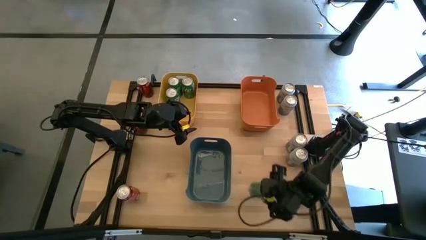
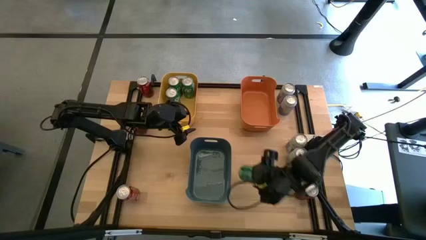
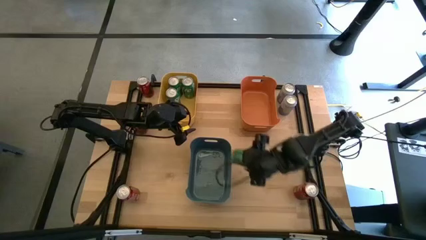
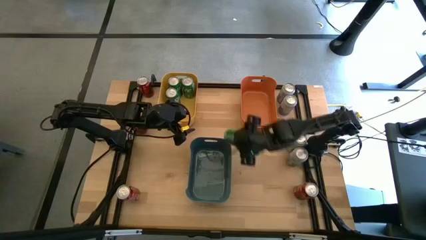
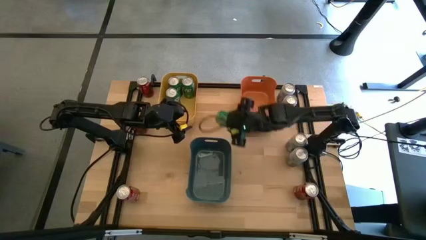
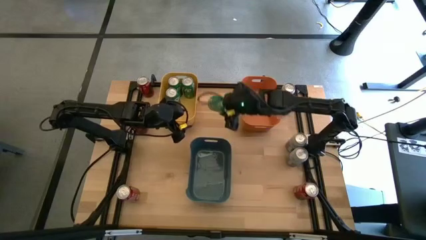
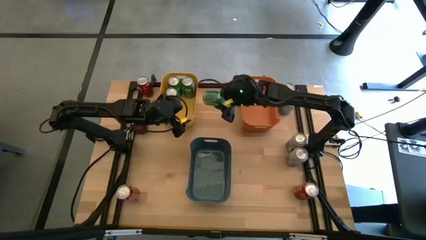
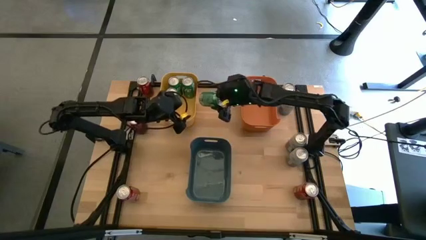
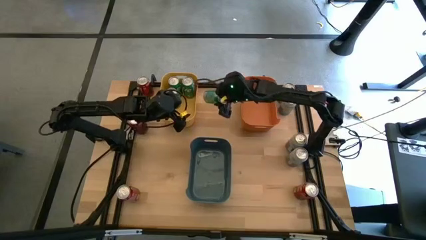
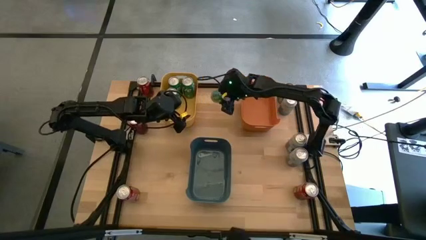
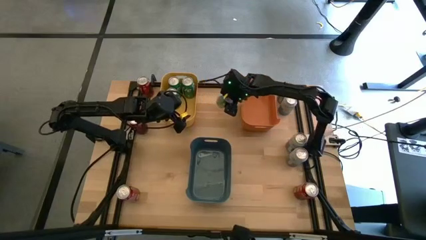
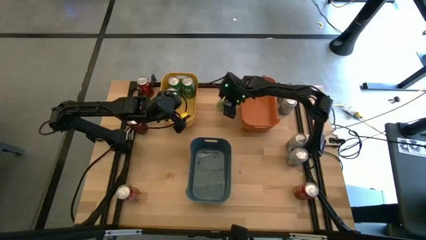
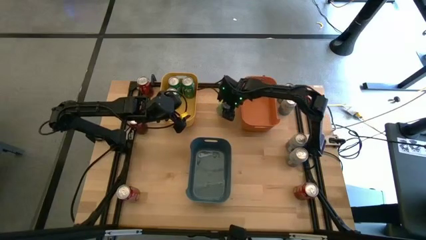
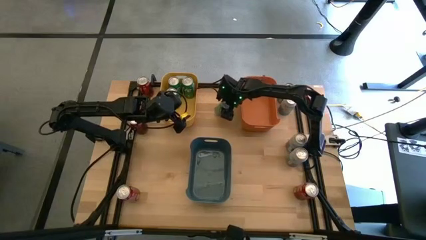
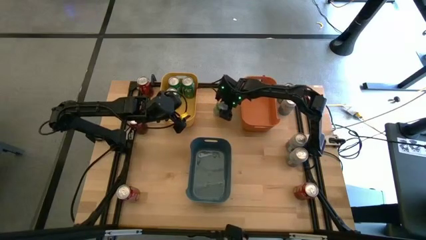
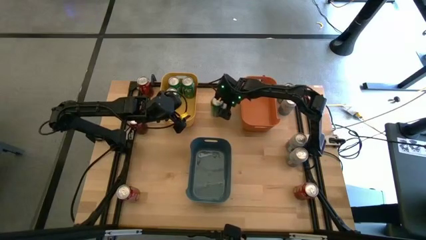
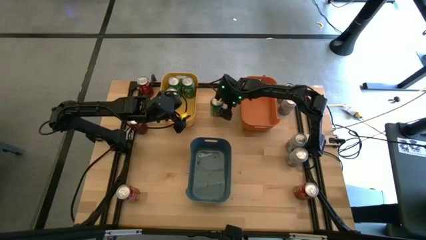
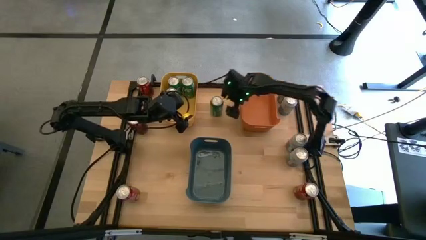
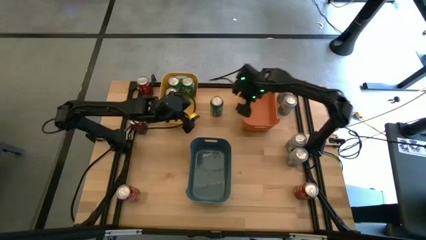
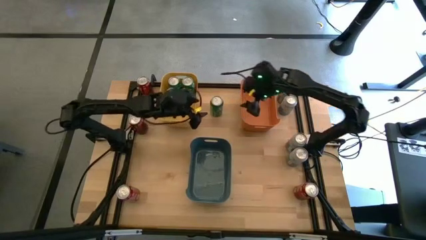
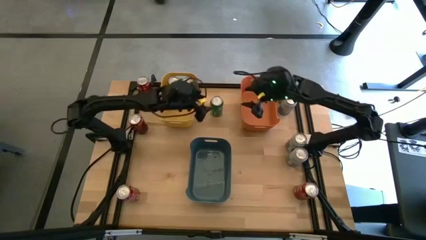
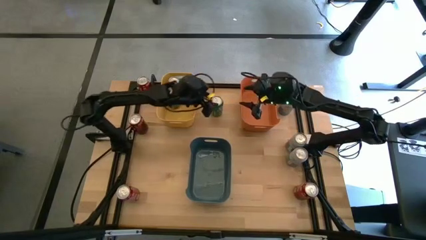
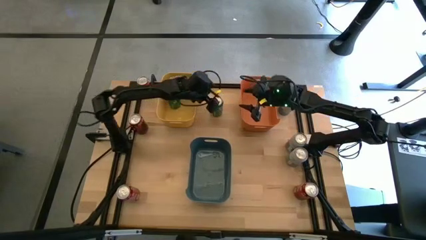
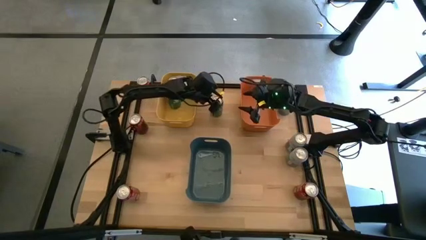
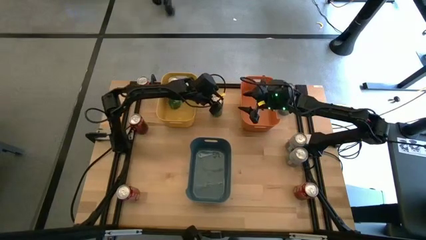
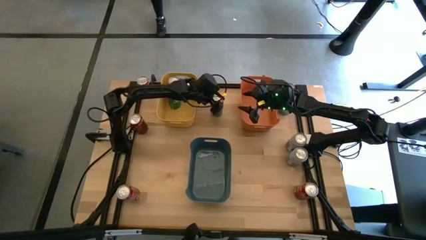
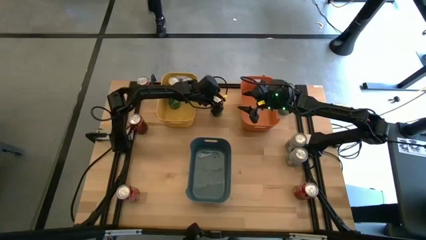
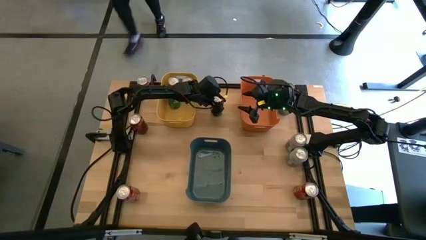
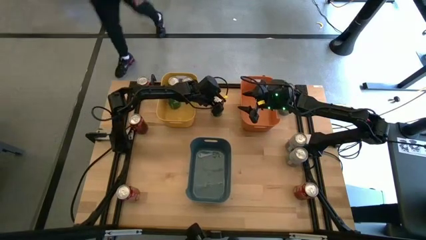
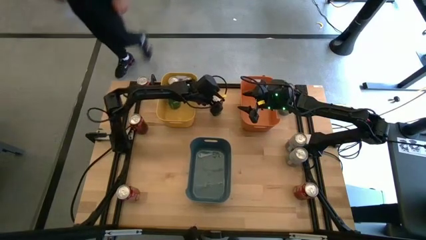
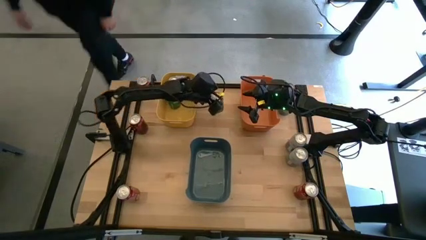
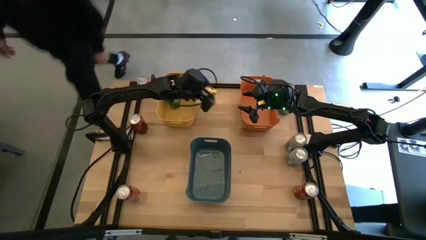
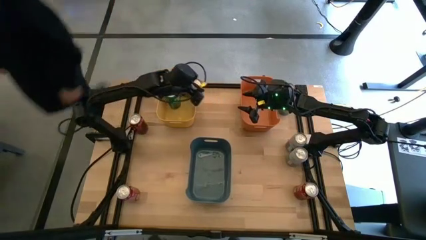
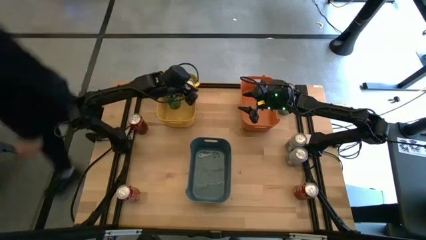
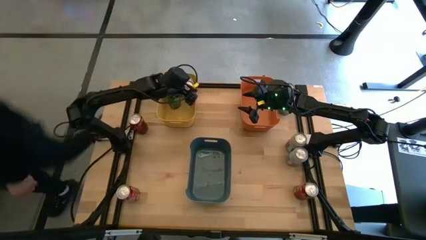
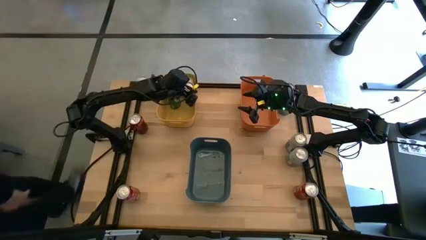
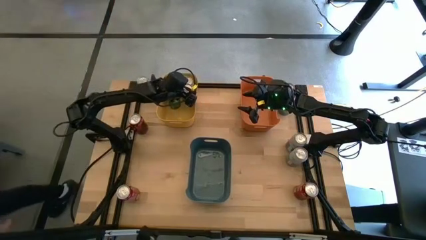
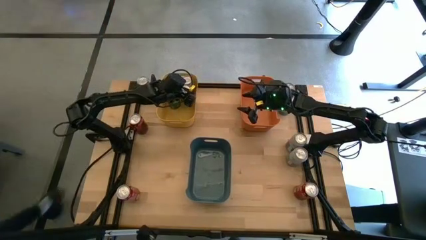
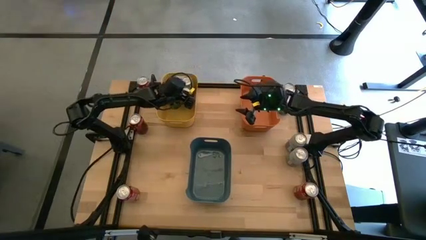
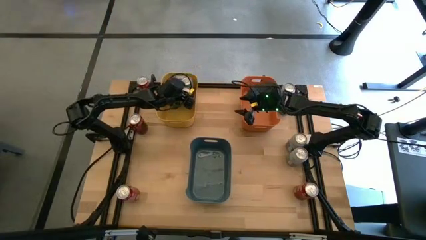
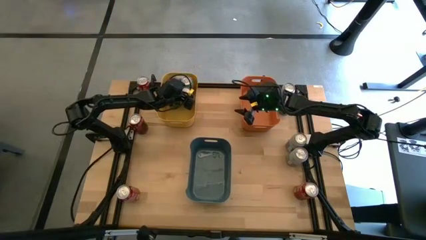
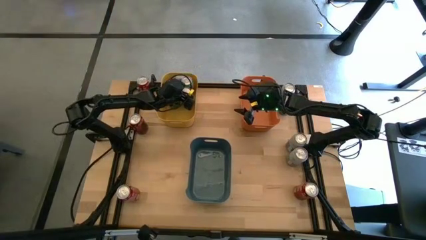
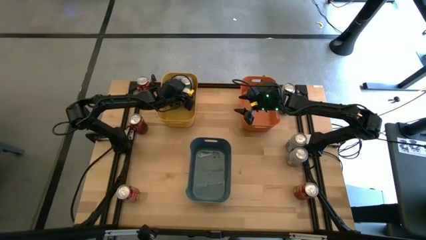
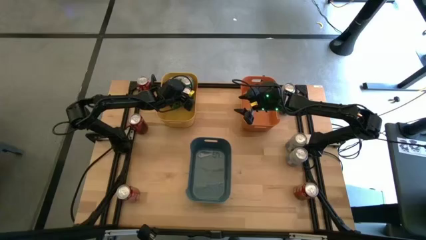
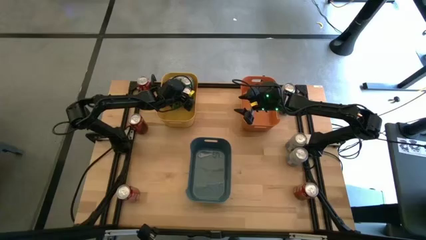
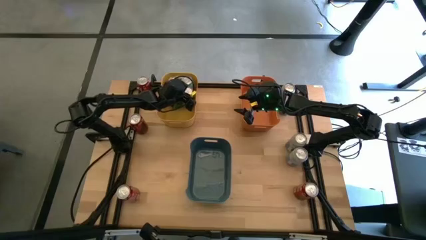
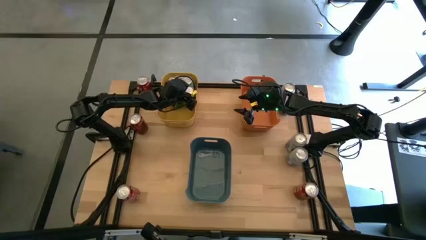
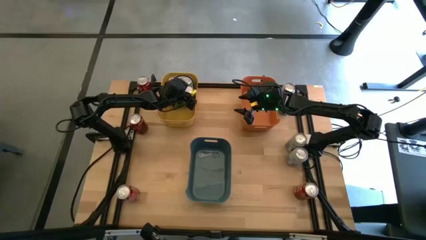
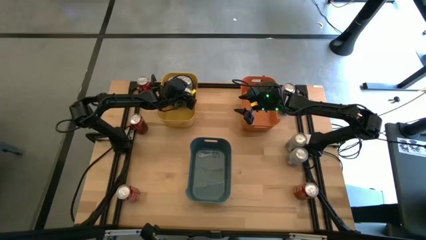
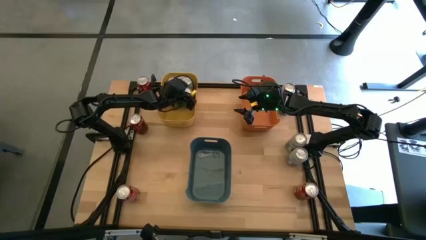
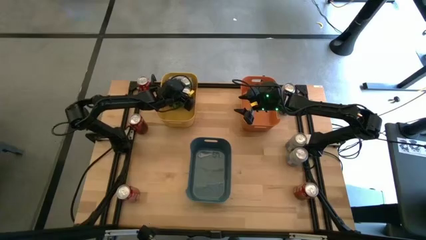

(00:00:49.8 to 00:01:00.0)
Task: Sort soda cans
Put the green soda can into the yellow bin

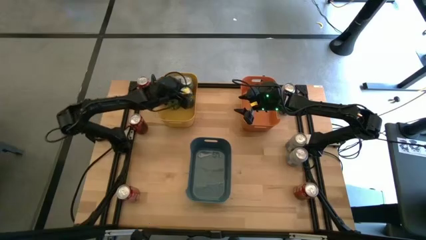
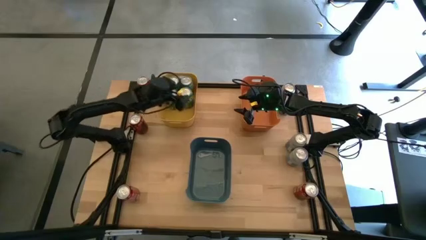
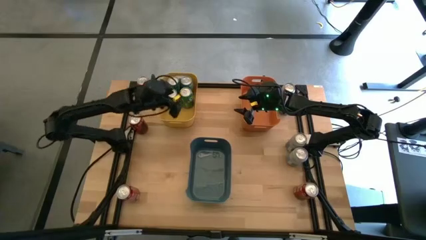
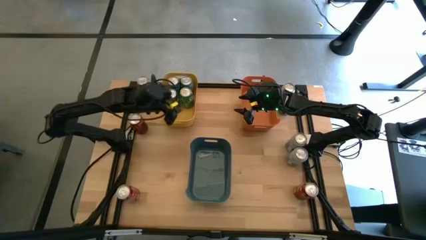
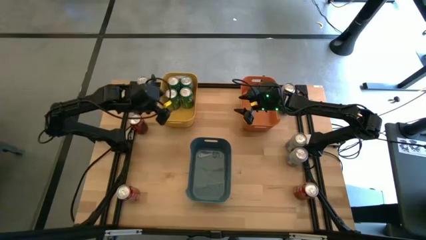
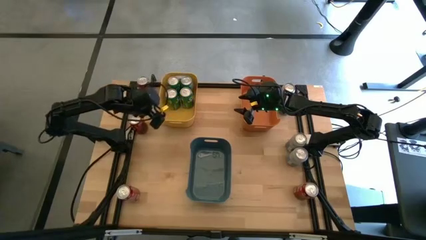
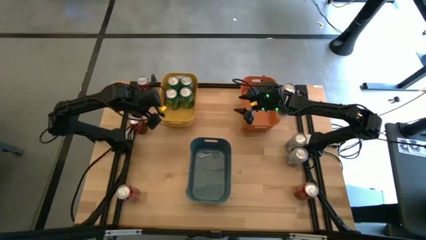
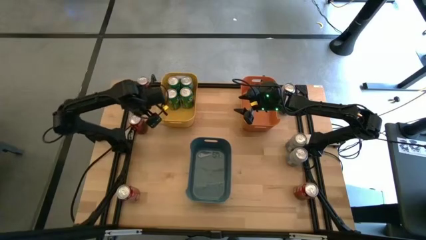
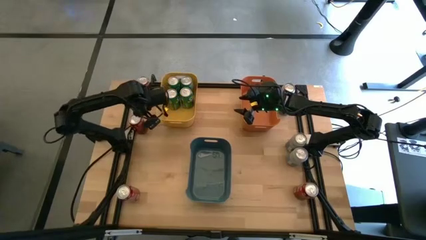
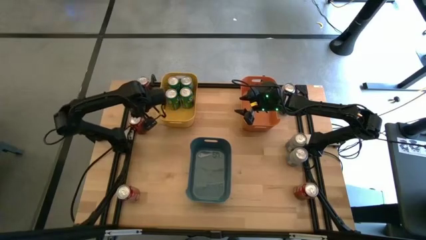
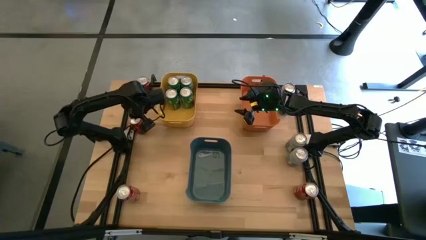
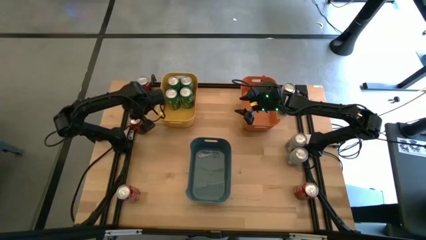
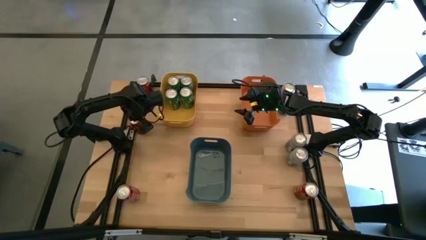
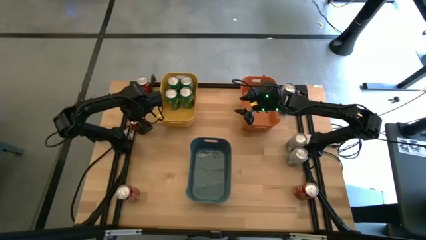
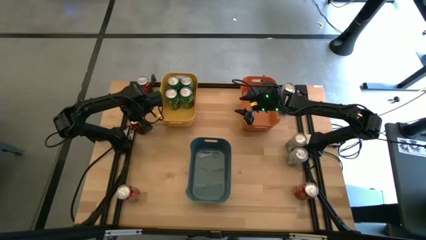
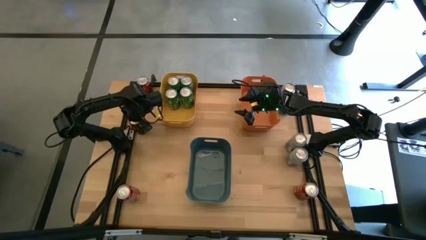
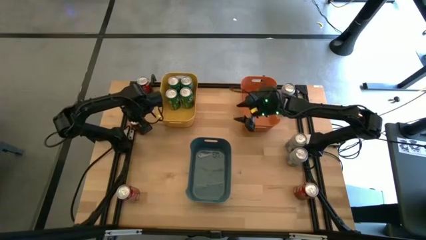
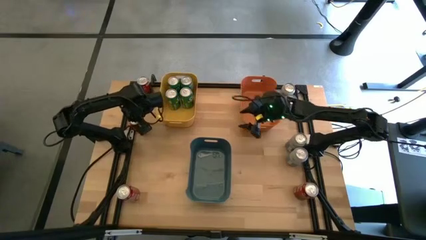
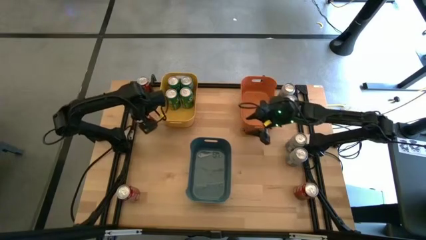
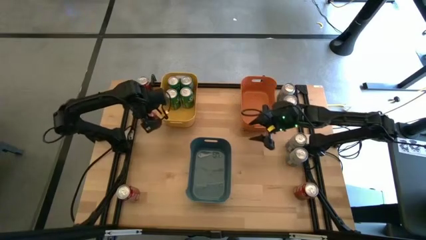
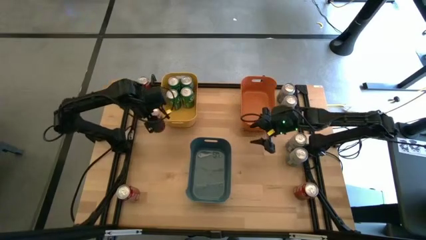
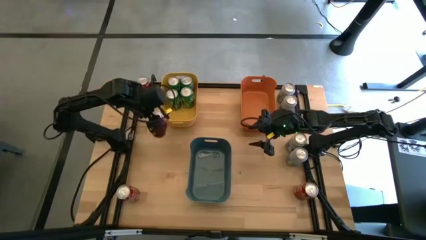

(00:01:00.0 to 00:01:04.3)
Put the red soda can into the blue bin

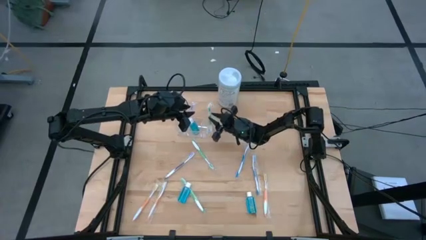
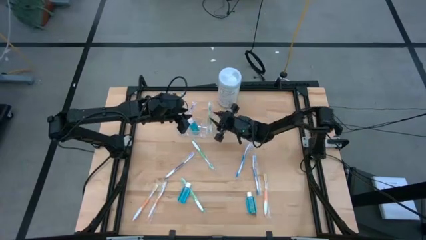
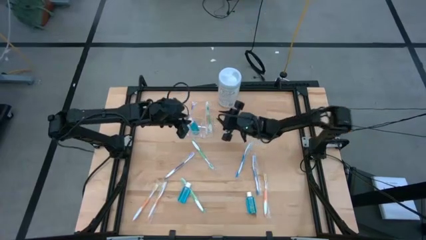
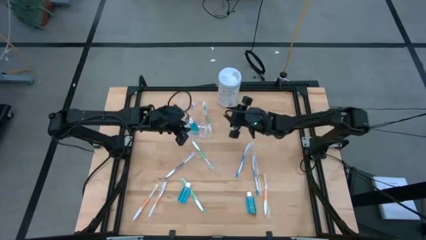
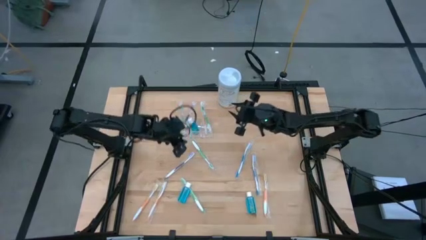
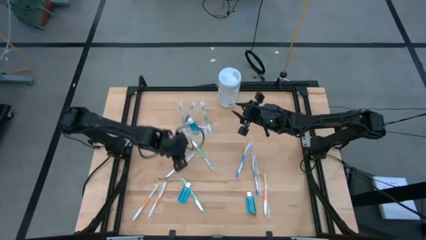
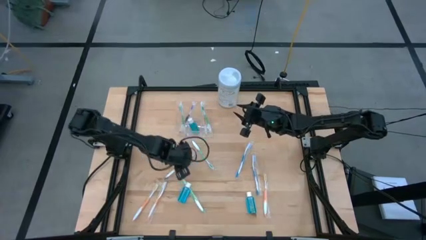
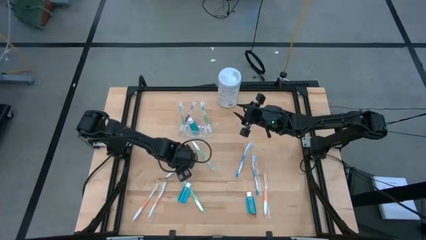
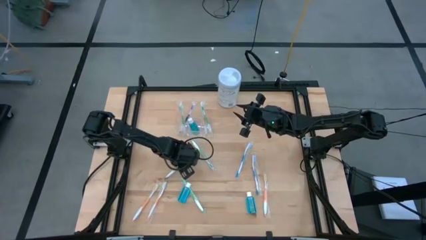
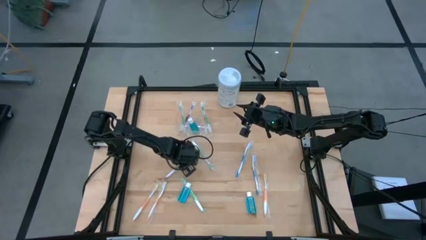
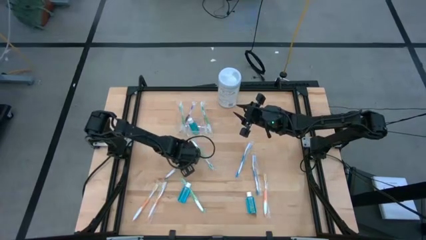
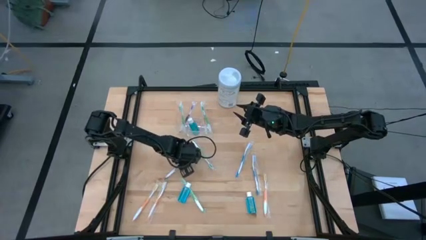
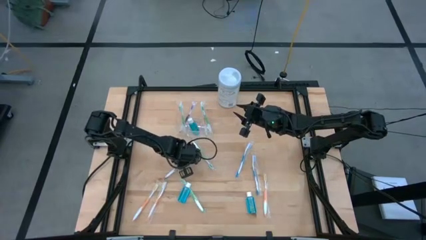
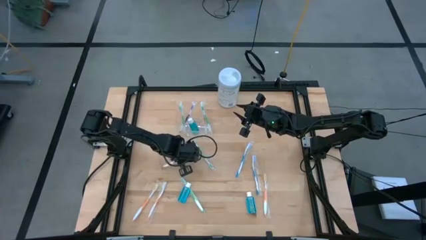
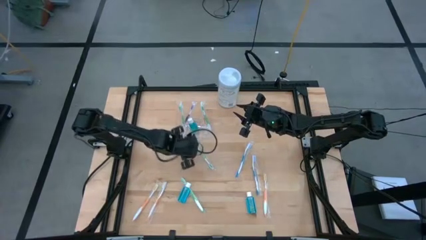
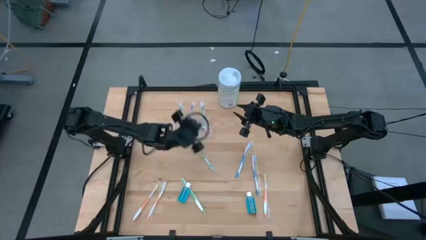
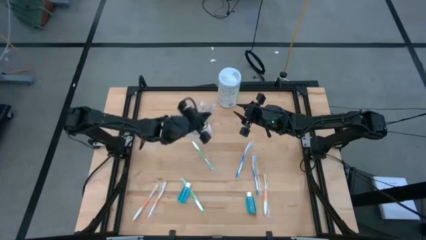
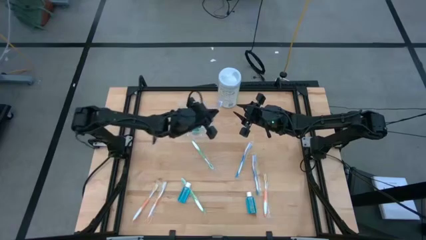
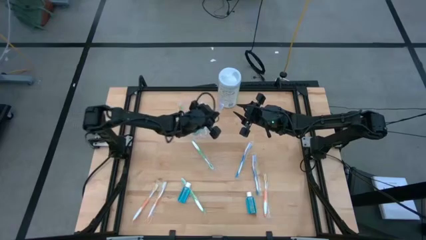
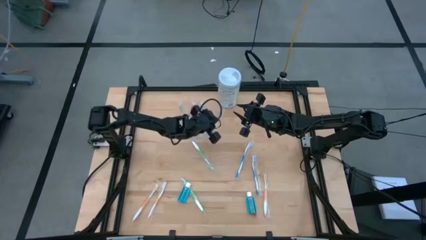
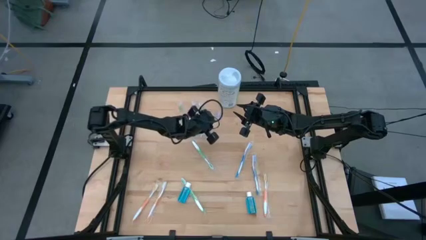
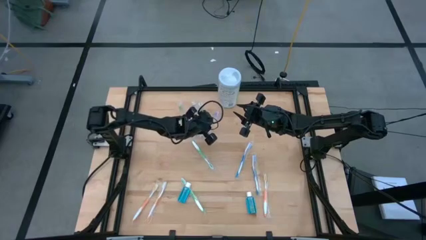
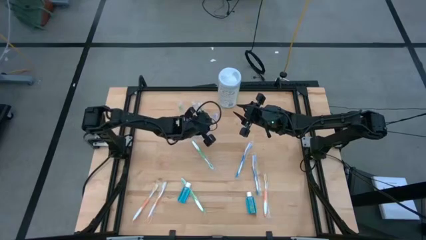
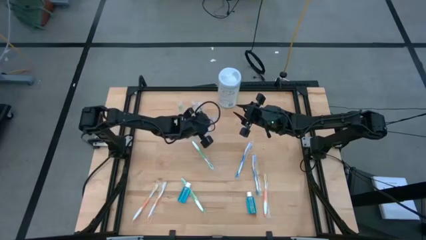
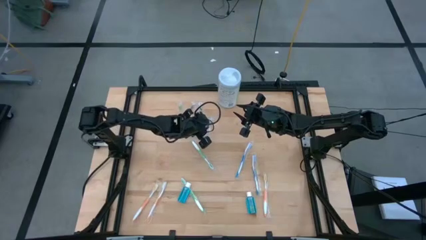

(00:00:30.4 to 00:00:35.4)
Task: Pick & Place toothbrushing station
Put the violet toothbrush into the transparent organizer
